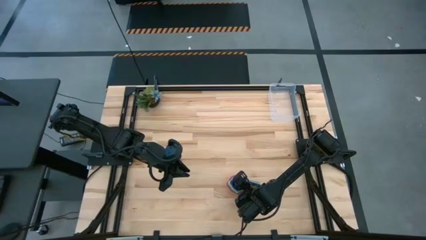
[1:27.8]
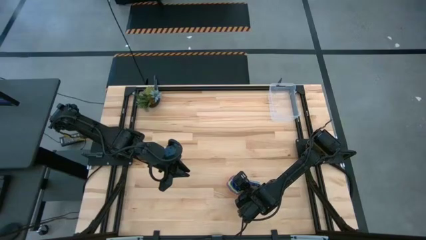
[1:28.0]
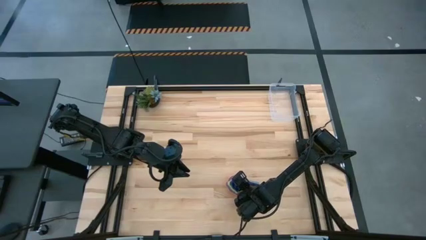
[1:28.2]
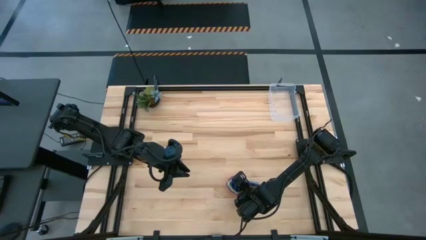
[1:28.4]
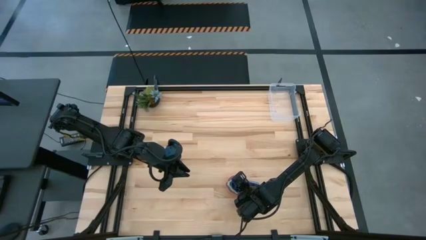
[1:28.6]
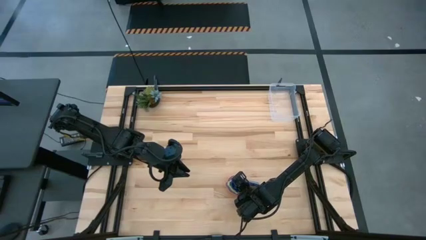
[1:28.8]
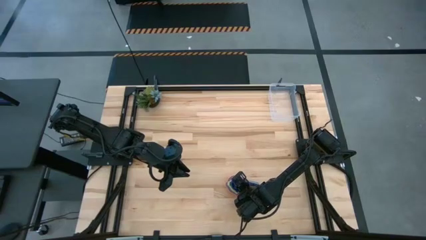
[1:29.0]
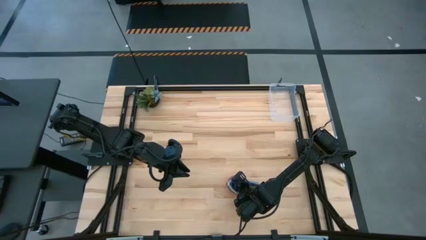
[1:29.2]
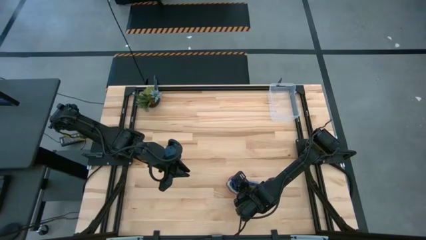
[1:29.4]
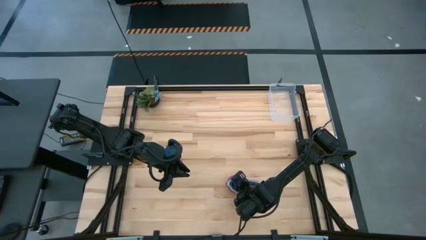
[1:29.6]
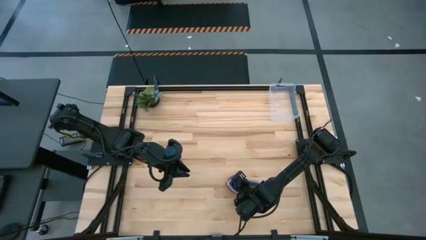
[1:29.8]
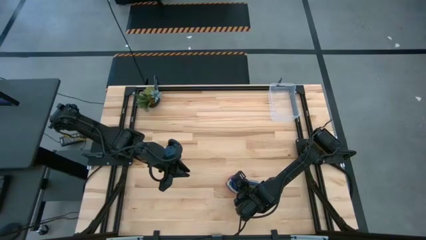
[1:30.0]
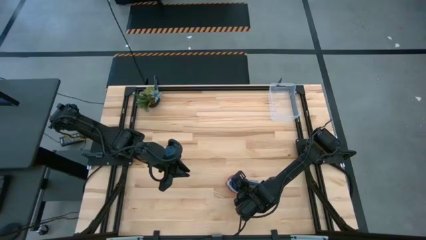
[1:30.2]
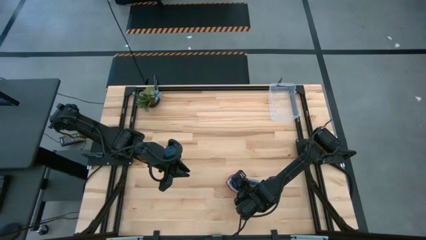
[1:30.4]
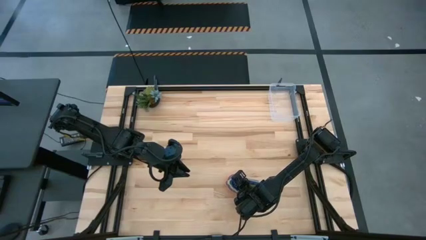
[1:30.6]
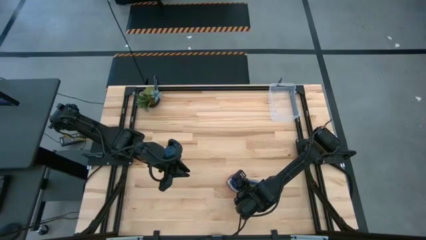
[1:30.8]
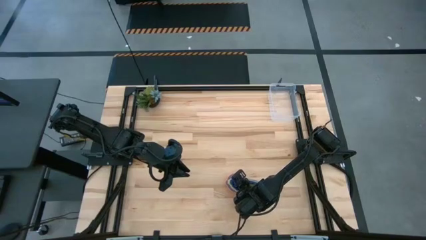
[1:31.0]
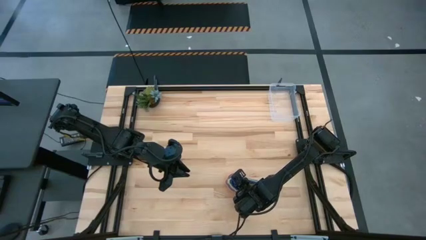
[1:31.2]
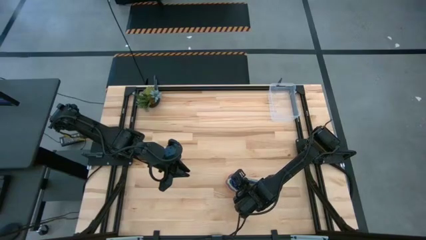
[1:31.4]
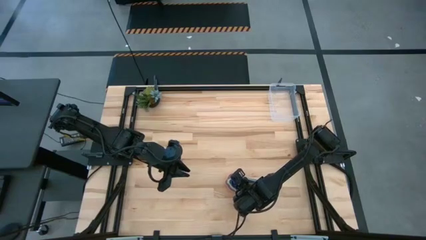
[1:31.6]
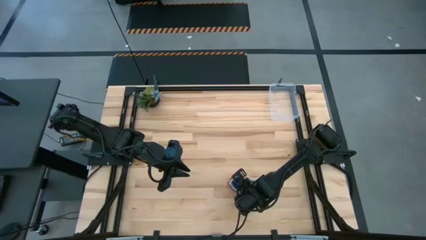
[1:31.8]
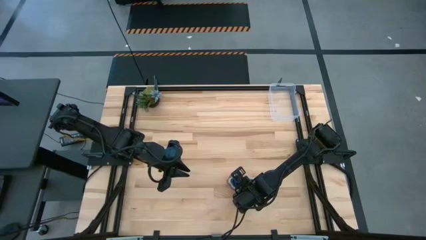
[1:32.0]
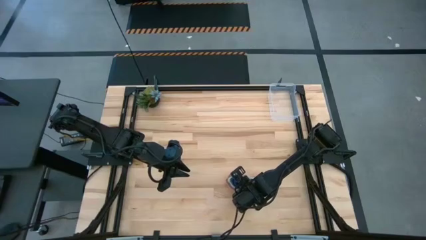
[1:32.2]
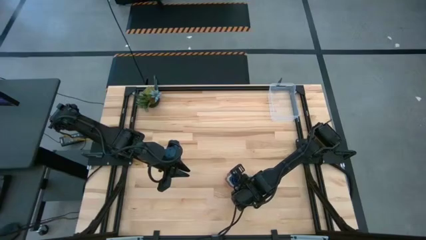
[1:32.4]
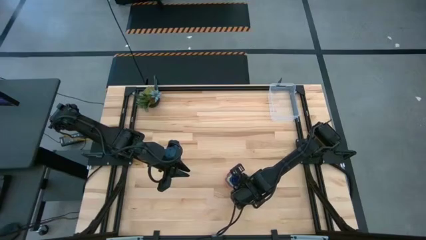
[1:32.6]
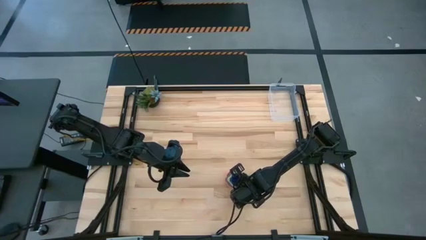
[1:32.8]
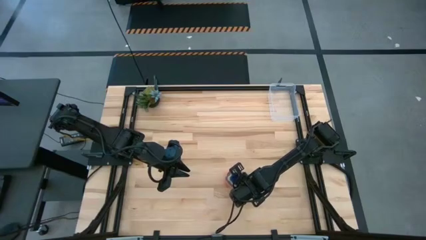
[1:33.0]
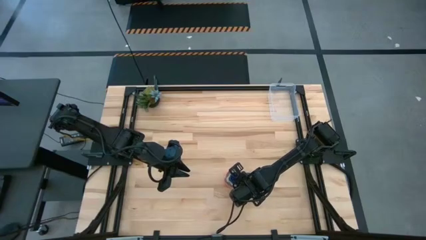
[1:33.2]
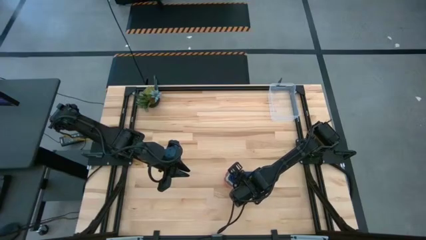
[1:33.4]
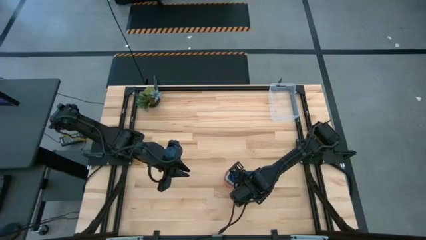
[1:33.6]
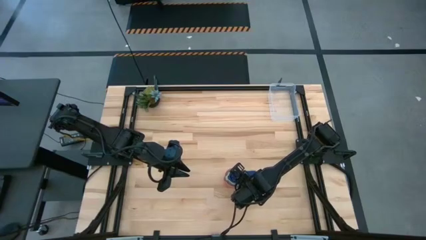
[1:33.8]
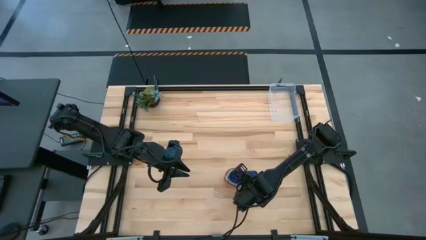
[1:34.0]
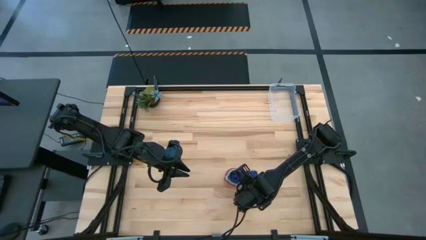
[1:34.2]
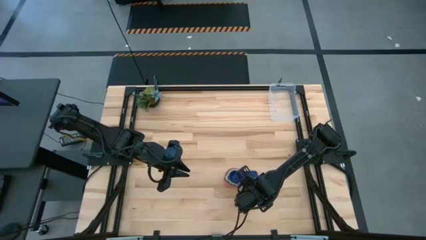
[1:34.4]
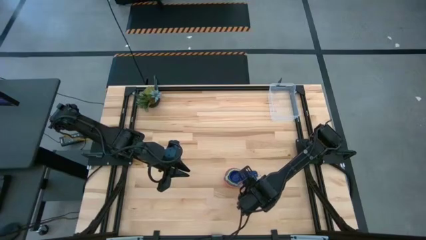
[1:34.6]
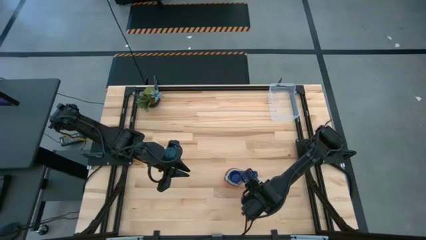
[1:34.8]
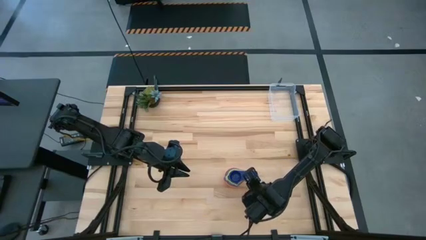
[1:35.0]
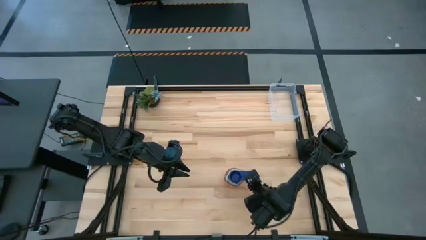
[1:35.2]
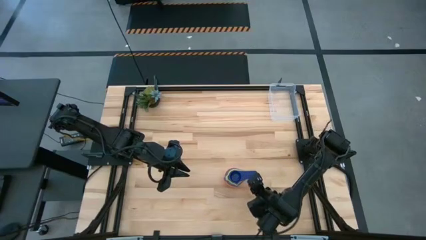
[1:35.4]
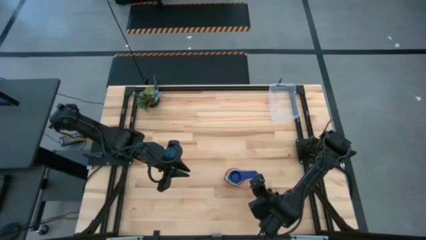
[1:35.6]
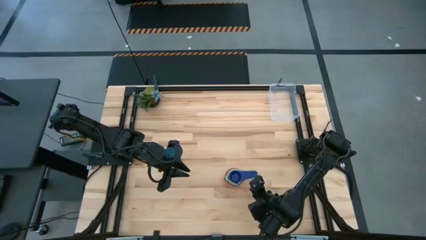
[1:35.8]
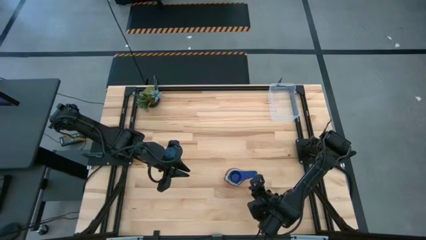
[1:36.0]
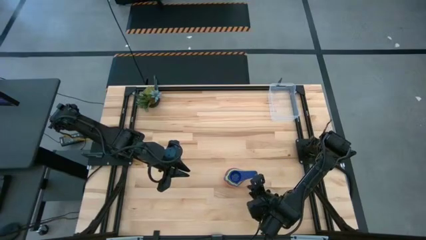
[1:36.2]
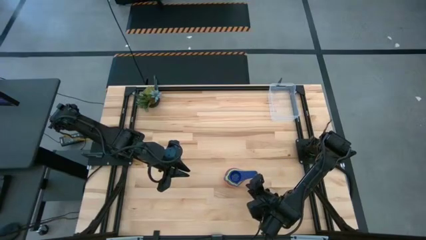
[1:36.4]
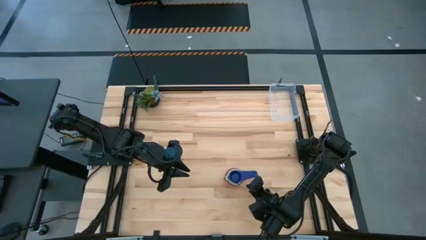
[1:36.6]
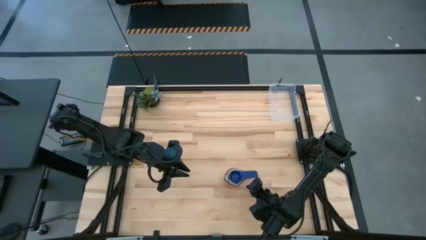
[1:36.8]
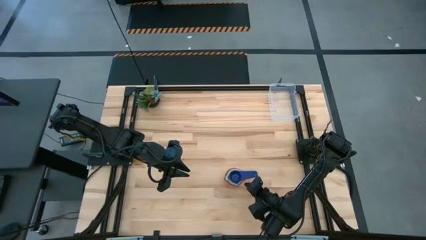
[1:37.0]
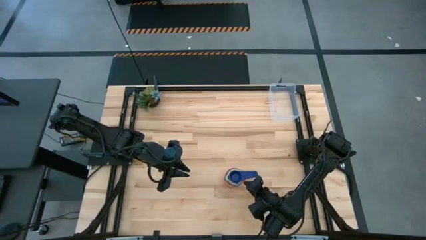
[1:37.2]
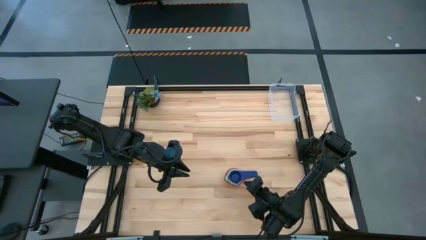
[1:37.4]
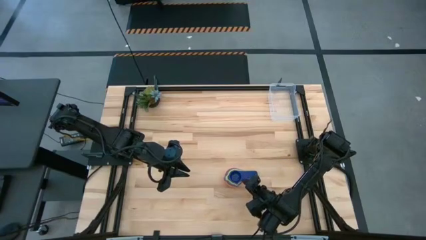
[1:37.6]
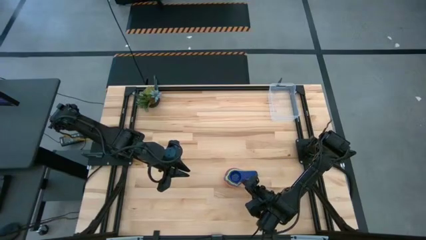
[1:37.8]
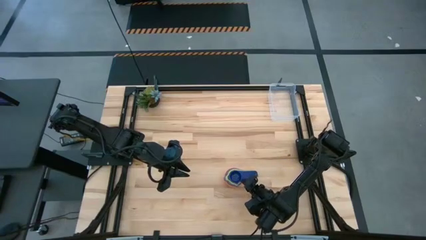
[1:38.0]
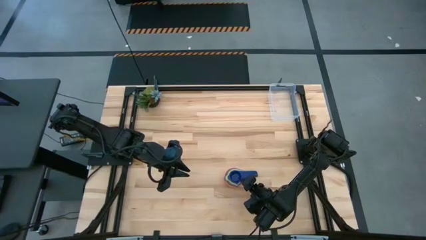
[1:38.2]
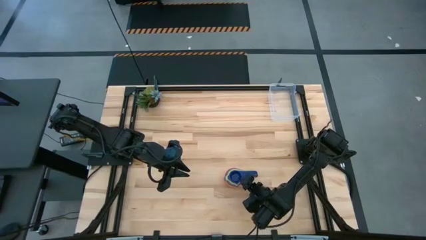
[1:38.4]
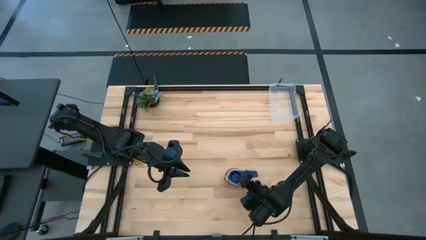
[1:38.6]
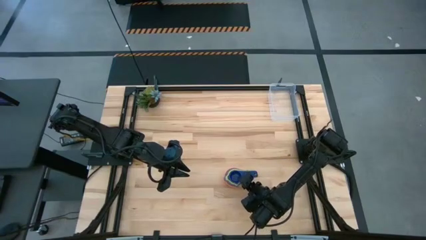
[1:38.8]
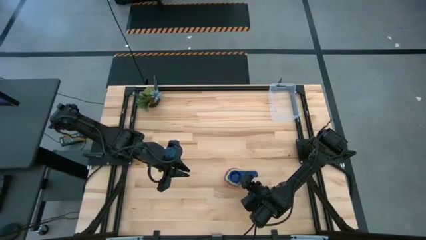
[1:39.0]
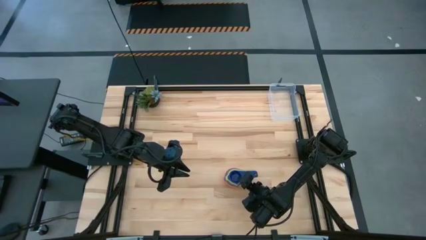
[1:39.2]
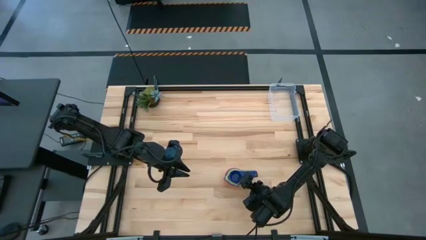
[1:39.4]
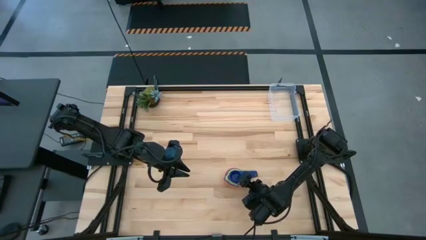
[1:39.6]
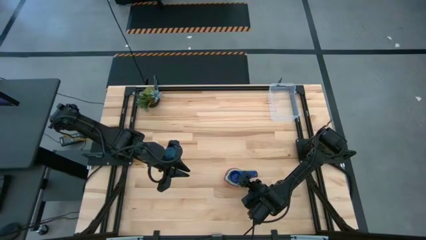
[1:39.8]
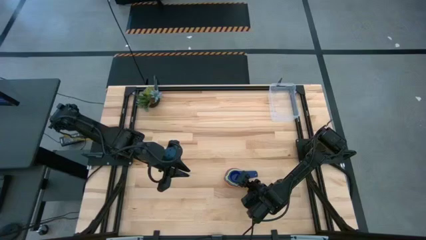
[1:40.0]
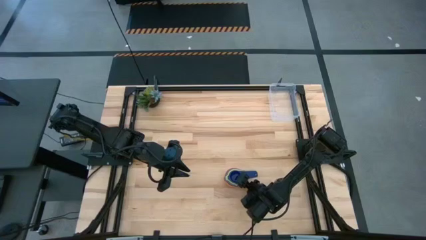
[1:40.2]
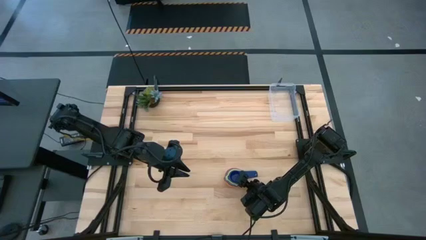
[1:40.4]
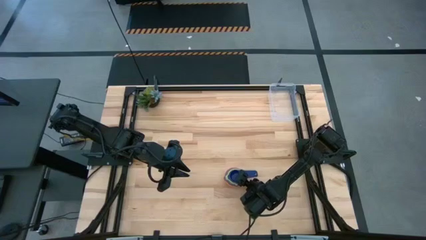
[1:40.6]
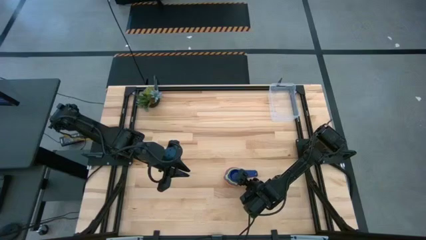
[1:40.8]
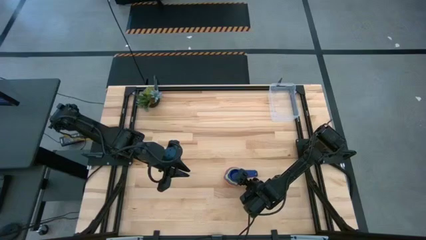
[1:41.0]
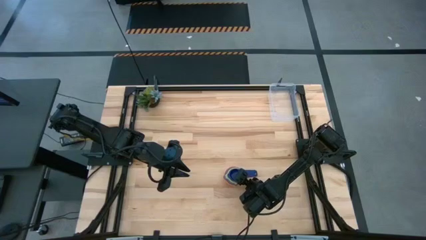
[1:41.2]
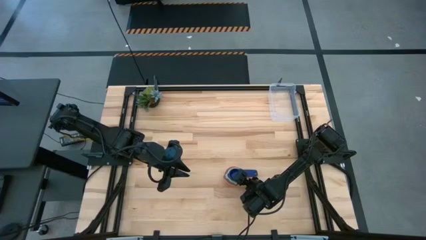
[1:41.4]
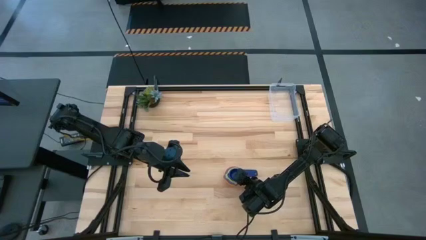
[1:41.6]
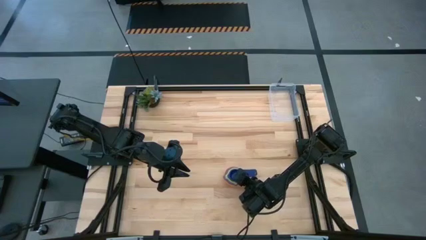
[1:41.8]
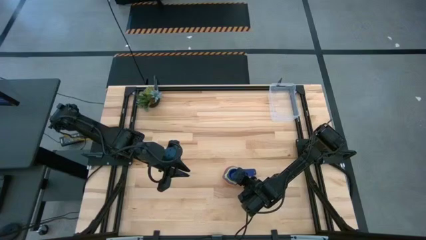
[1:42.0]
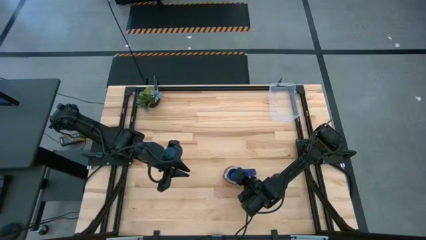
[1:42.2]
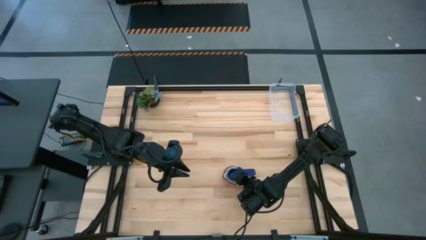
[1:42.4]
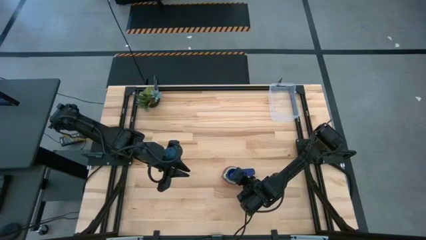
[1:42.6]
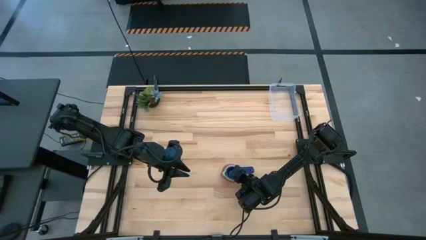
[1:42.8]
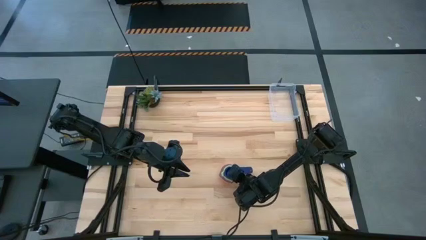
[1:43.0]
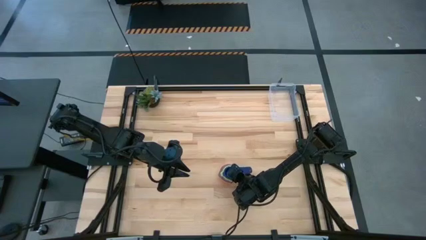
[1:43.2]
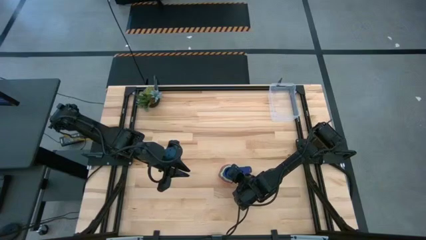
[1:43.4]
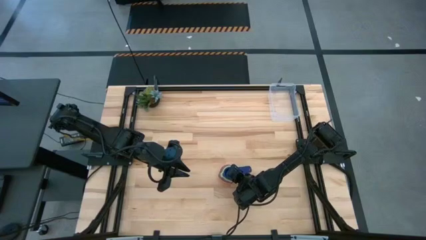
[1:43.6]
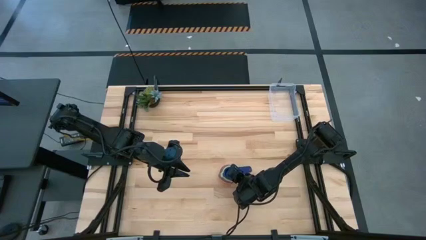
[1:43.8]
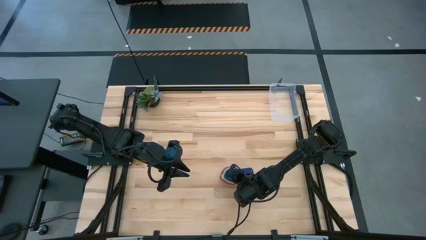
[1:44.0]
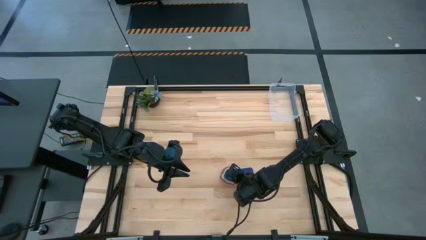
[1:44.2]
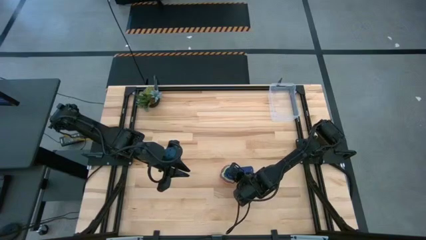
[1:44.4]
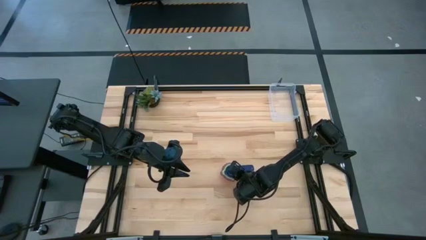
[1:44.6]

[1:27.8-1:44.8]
Task: Nest measuring cups in basket
Put the stacked measuring cups into the bin
